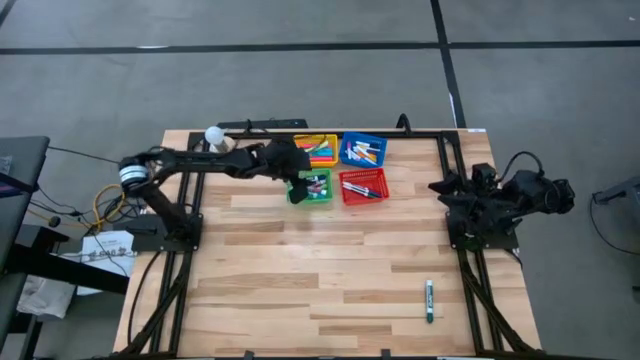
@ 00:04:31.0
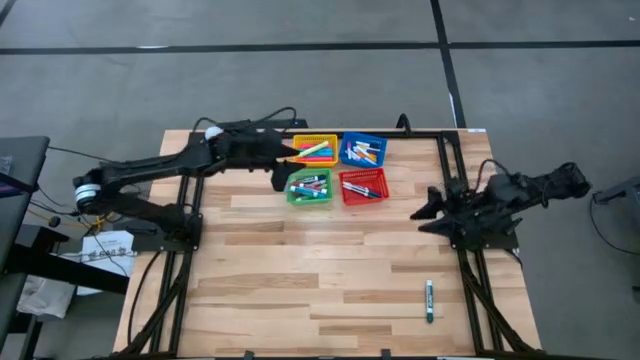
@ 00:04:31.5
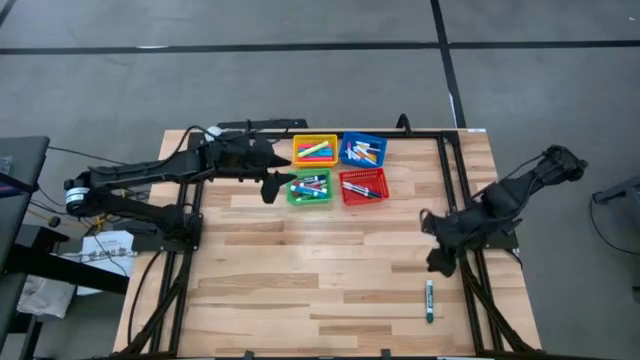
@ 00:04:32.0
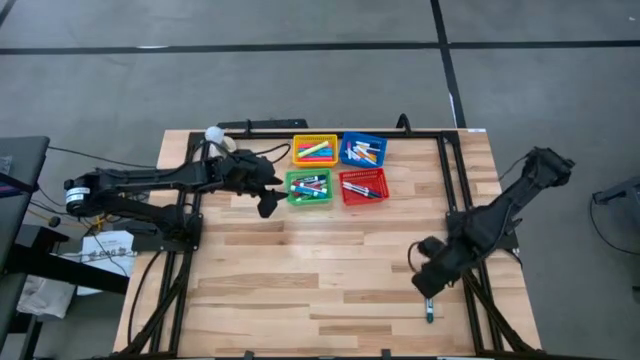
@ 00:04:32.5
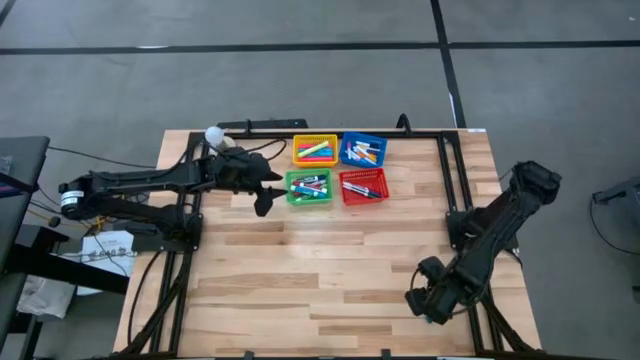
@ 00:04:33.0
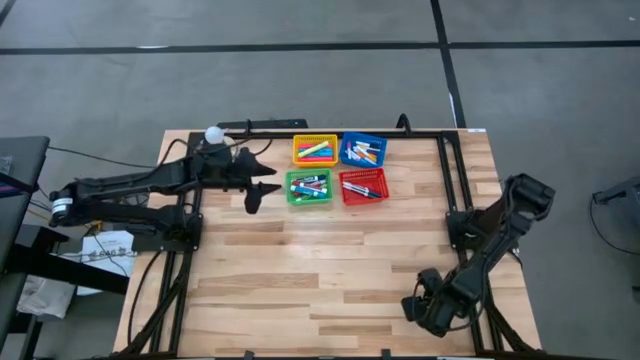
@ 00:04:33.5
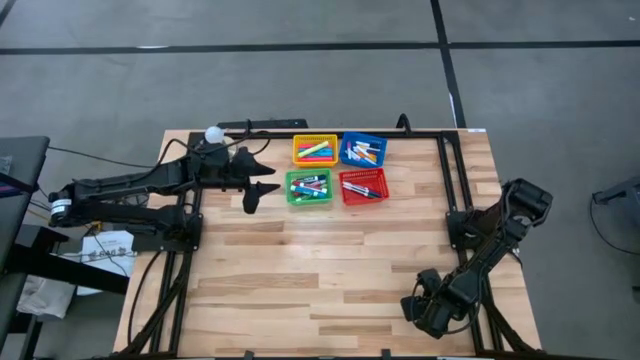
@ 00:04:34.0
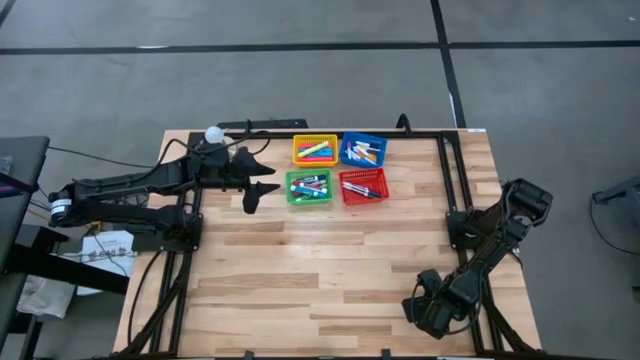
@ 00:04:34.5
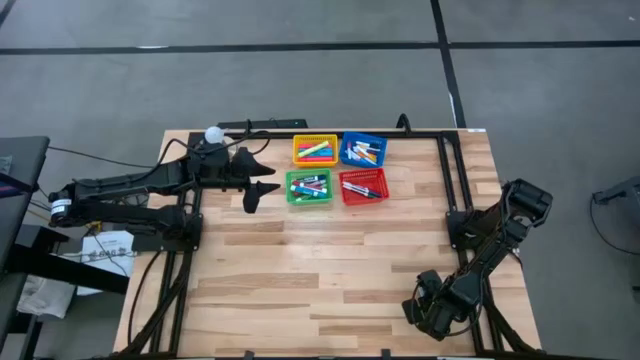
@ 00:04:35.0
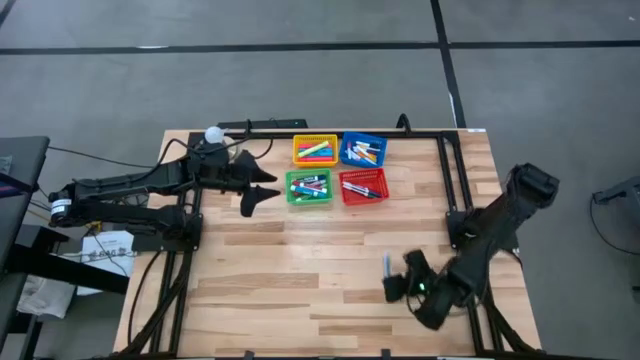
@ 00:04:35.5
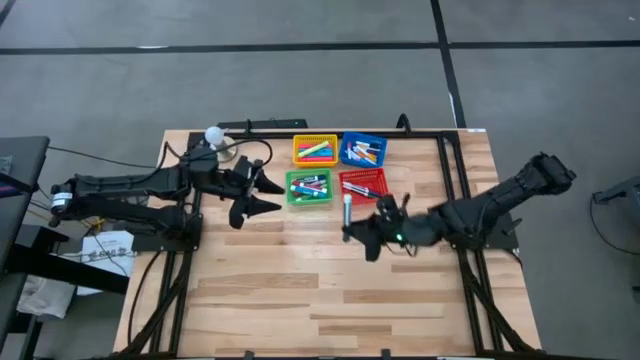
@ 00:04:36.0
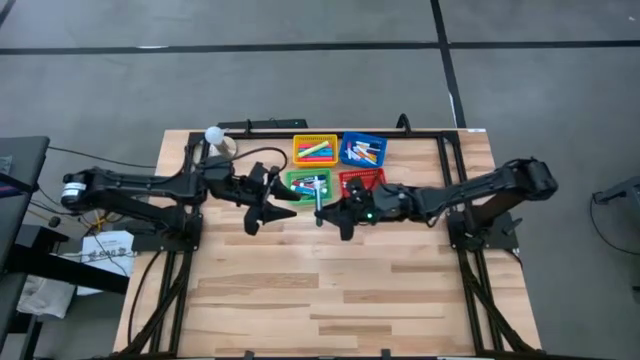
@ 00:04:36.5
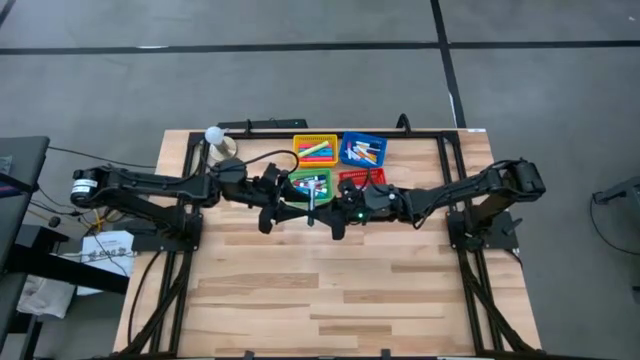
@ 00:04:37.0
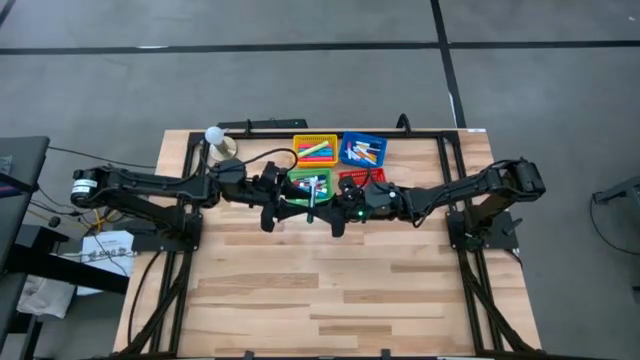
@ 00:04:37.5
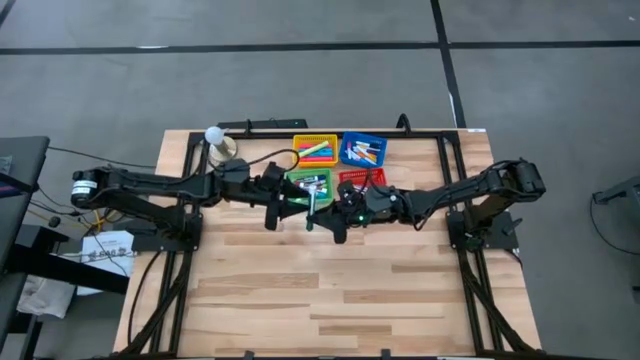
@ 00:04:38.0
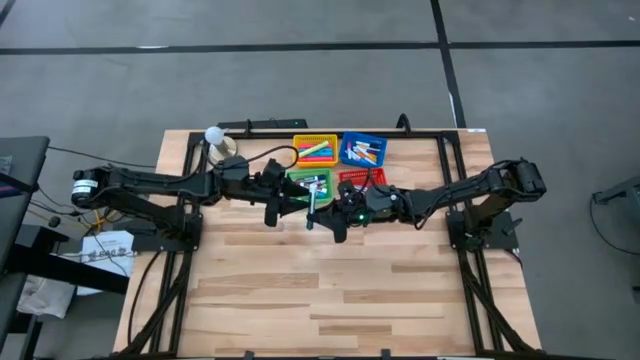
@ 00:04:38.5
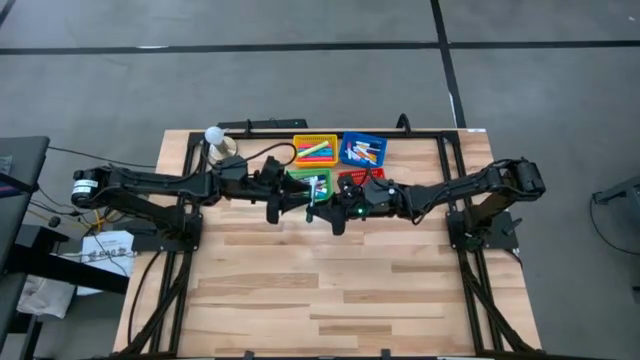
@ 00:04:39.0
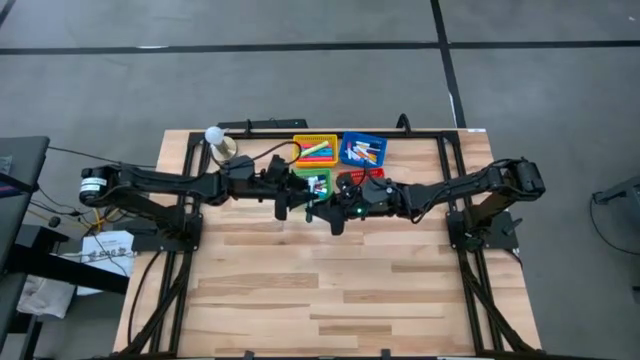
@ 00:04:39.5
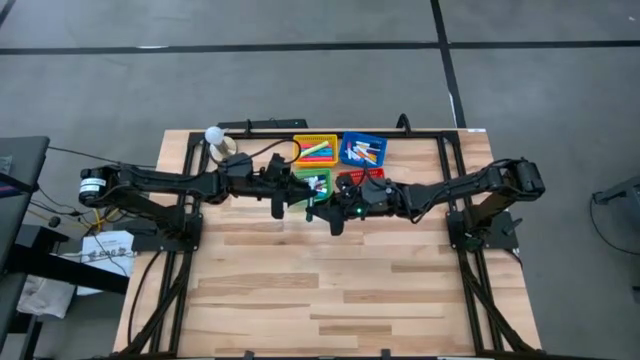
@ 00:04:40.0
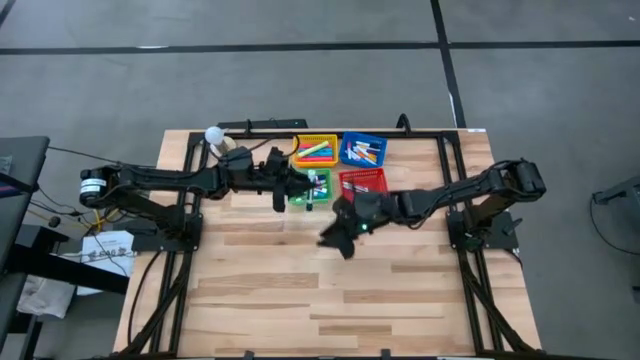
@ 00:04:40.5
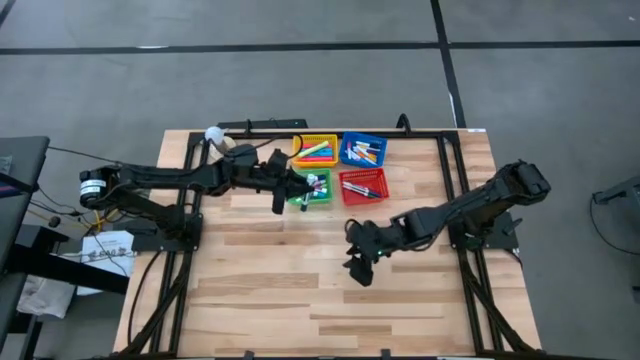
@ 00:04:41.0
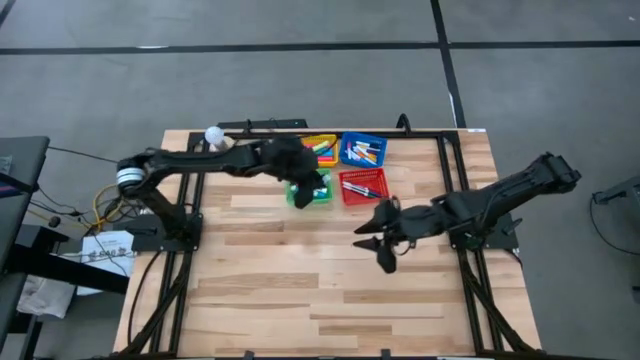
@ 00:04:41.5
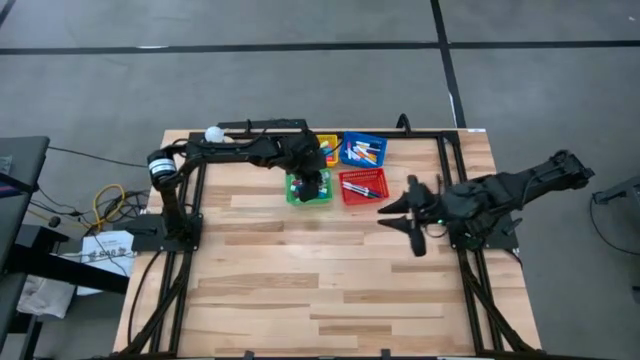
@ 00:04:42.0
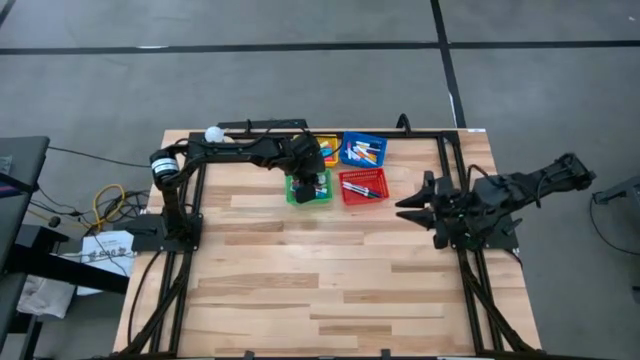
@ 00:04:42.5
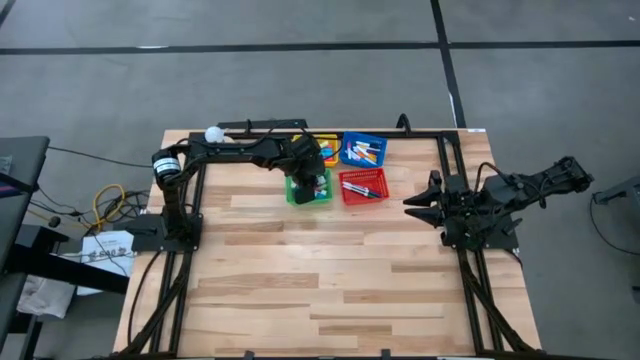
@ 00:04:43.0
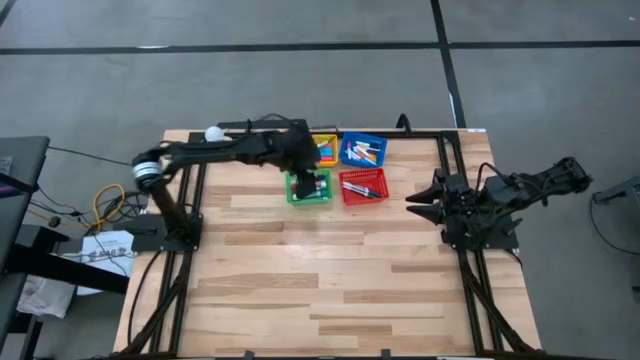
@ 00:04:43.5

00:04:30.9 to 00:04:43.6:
Task: Pick & Place Markers
Put the dark green dry erase marker into the green bin

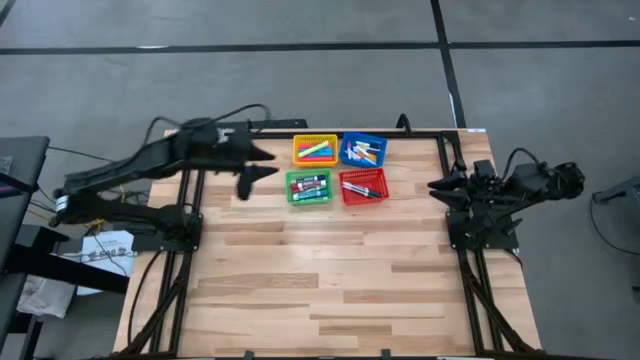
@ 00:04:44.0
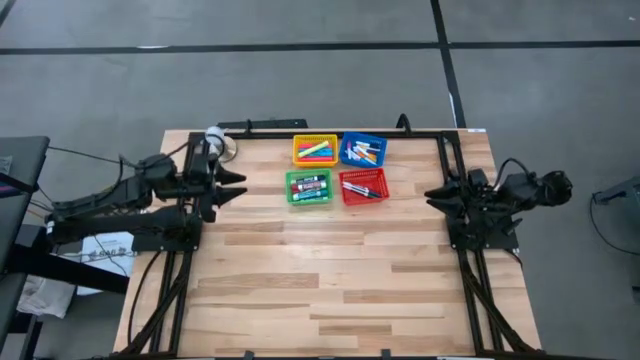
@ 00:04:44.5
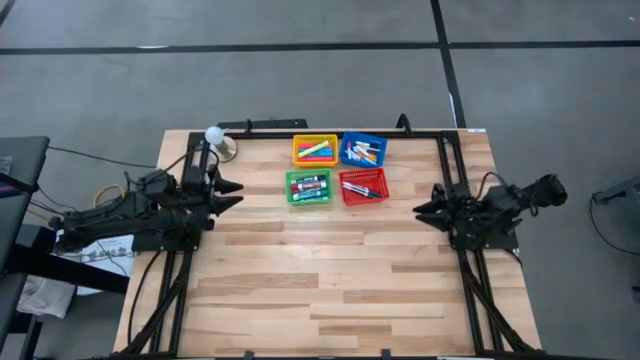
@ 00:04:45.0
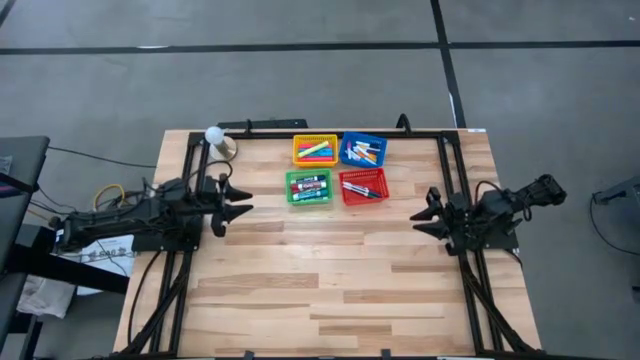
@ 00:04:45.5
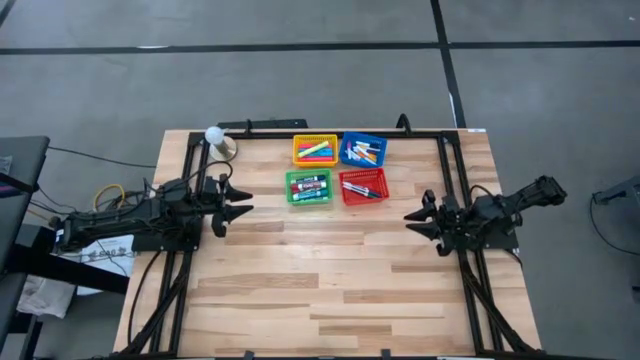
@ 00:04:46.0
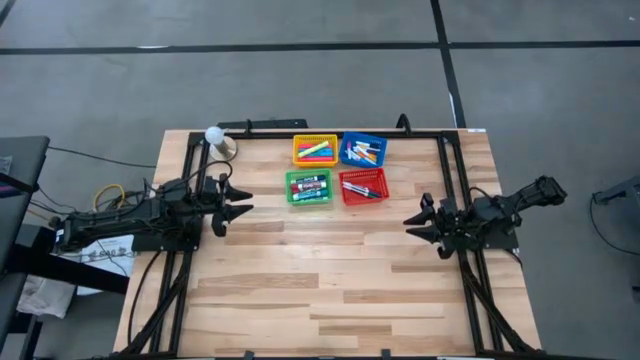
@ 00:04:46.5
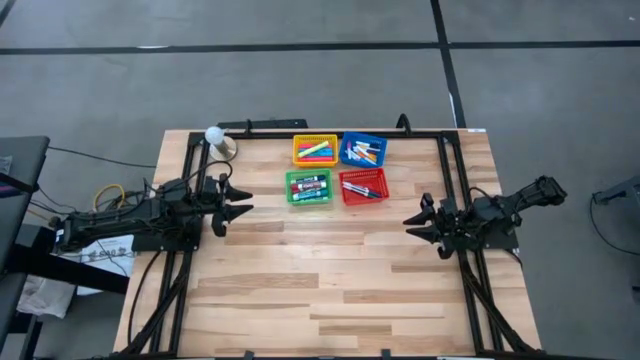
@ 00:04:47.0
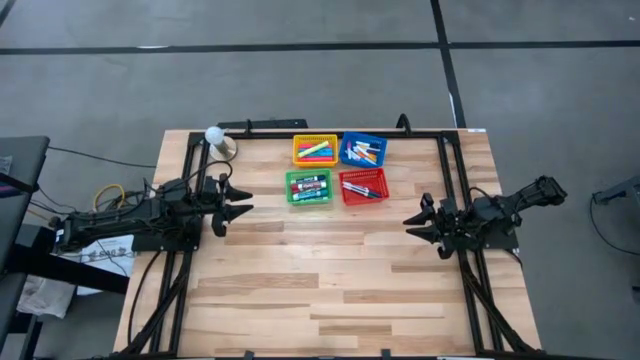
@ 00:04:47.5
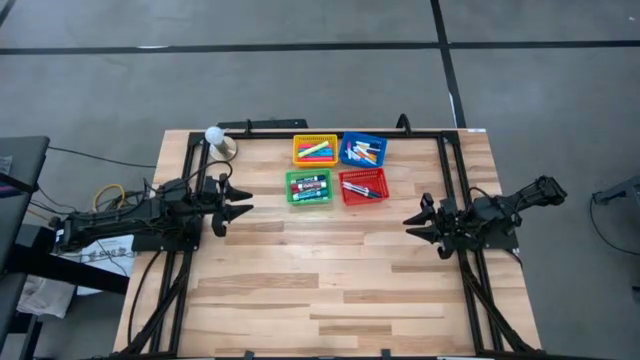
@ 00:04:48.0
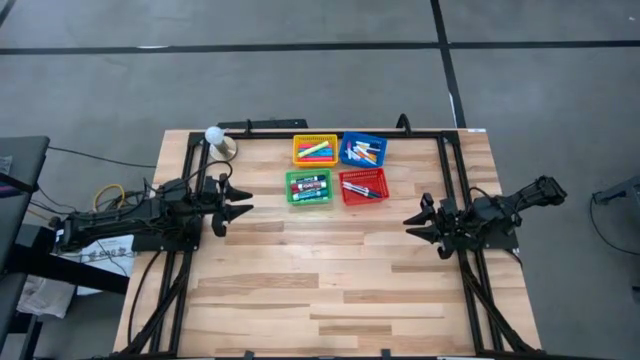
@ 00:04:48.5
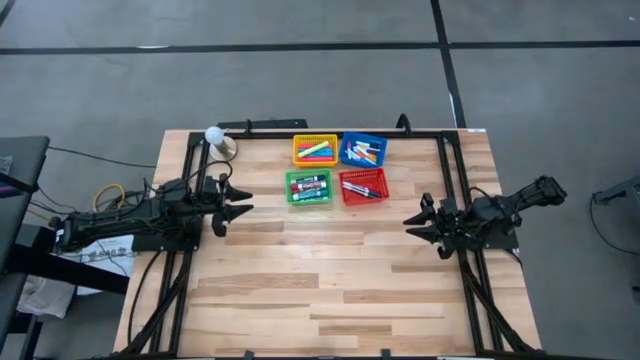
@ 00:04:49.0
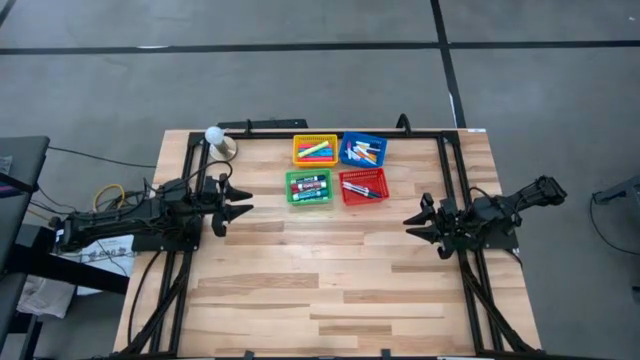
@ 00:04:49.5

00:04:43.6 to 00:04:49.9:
Return to Home Position
